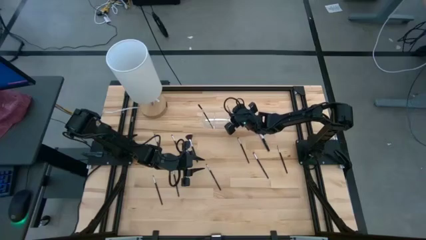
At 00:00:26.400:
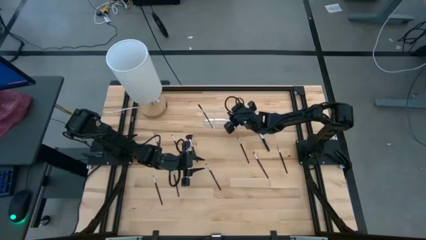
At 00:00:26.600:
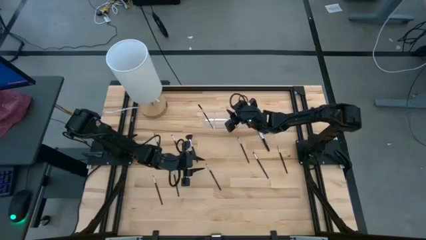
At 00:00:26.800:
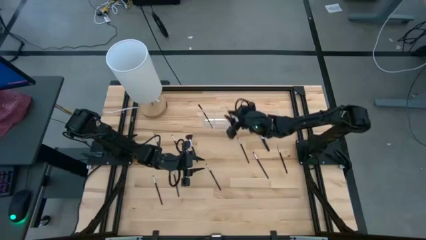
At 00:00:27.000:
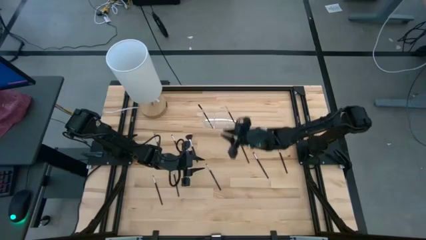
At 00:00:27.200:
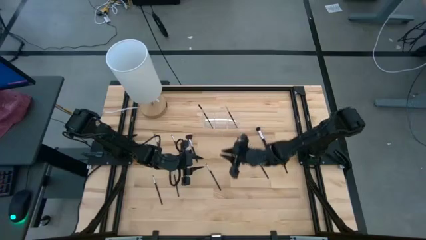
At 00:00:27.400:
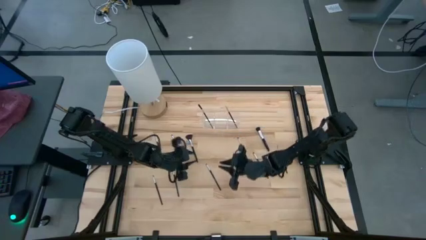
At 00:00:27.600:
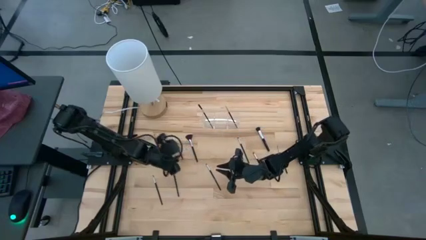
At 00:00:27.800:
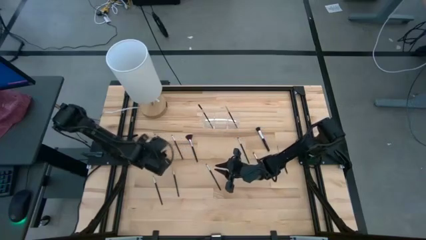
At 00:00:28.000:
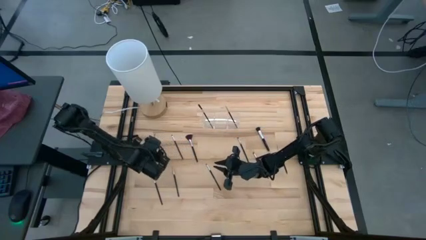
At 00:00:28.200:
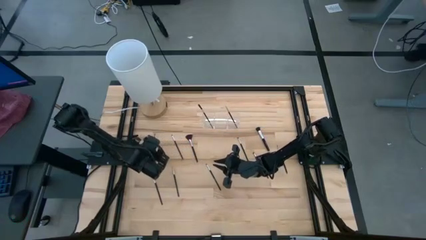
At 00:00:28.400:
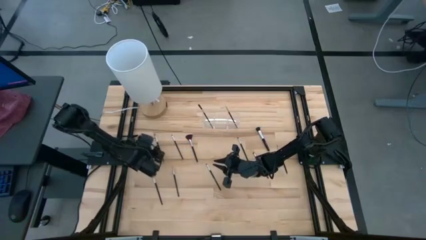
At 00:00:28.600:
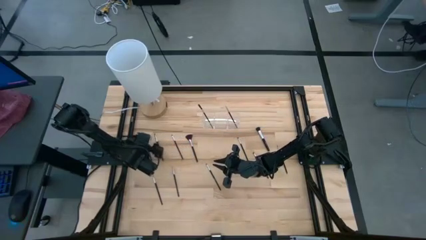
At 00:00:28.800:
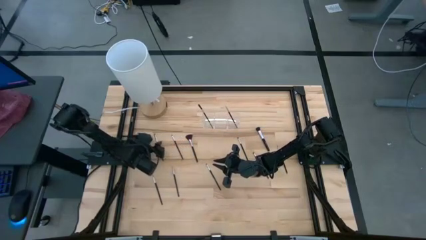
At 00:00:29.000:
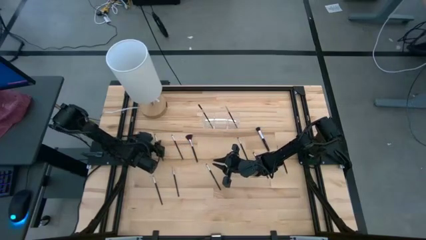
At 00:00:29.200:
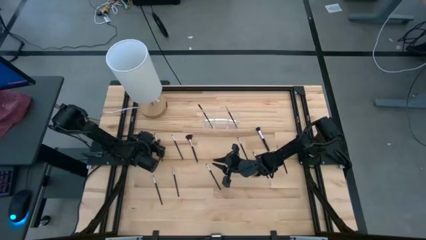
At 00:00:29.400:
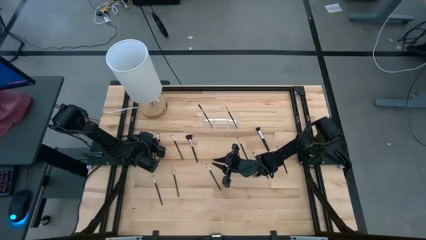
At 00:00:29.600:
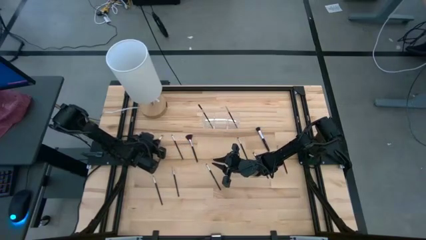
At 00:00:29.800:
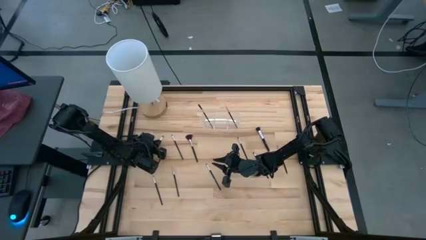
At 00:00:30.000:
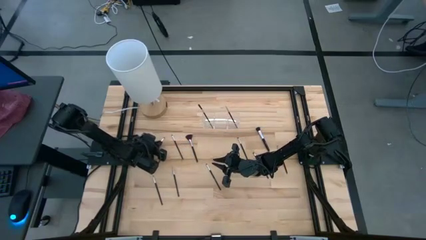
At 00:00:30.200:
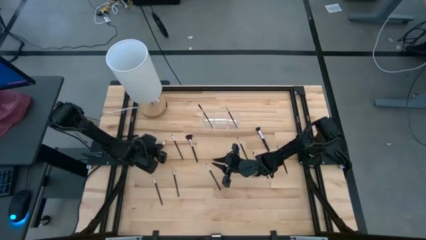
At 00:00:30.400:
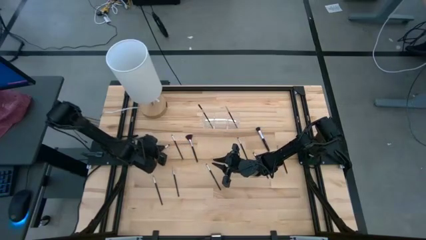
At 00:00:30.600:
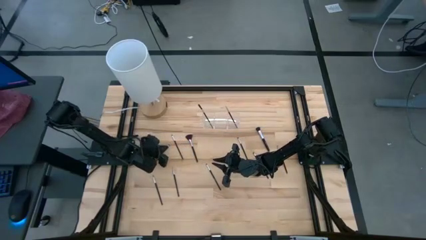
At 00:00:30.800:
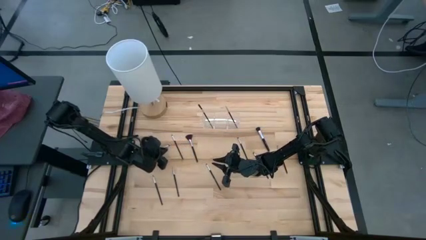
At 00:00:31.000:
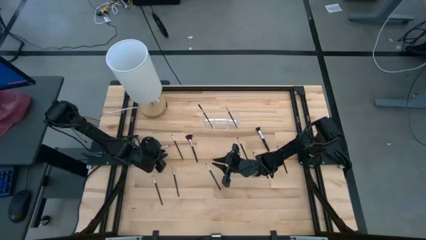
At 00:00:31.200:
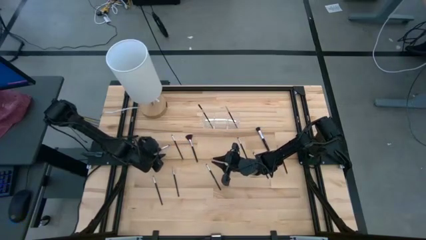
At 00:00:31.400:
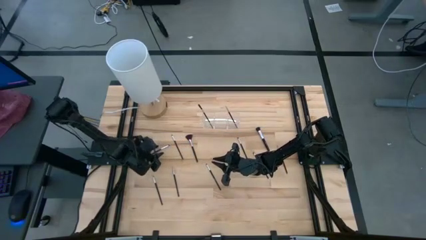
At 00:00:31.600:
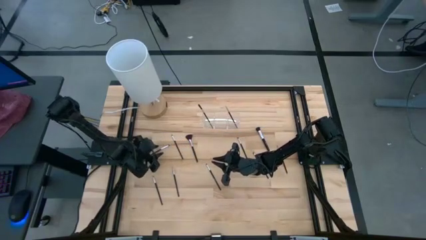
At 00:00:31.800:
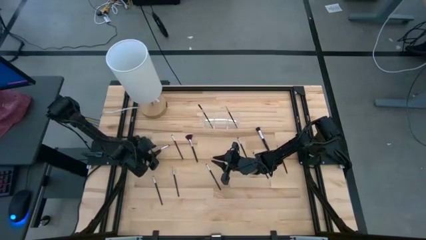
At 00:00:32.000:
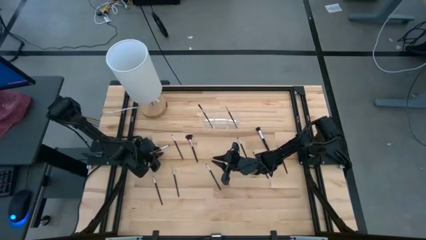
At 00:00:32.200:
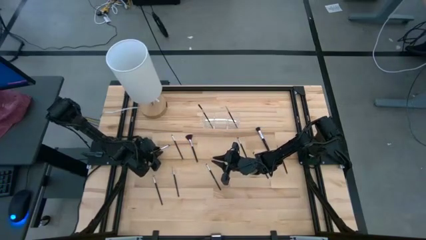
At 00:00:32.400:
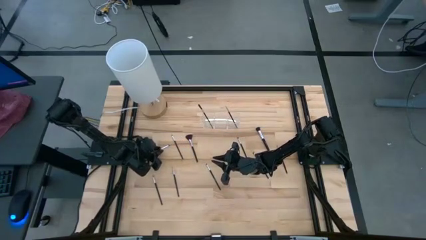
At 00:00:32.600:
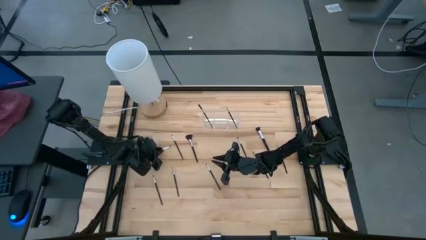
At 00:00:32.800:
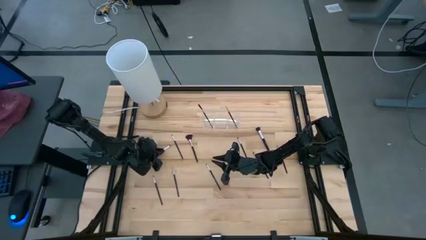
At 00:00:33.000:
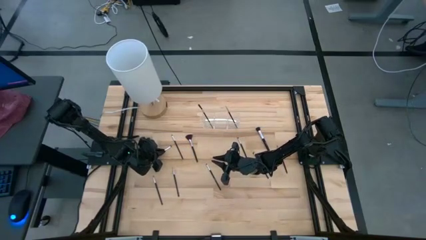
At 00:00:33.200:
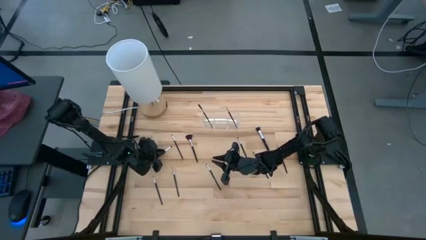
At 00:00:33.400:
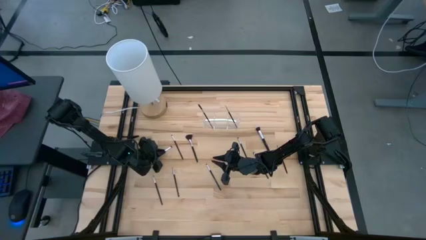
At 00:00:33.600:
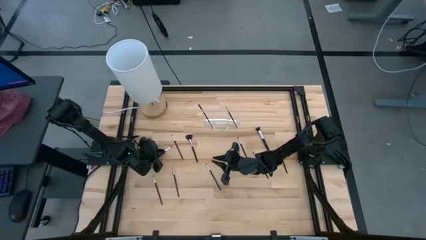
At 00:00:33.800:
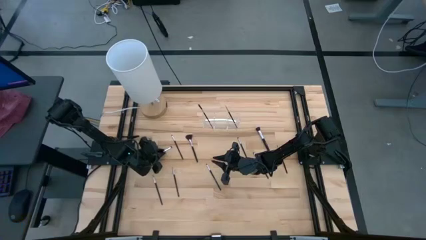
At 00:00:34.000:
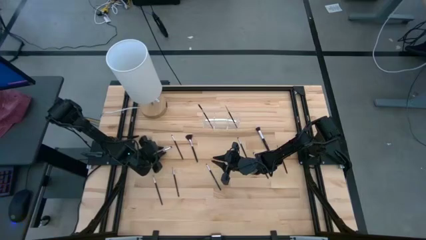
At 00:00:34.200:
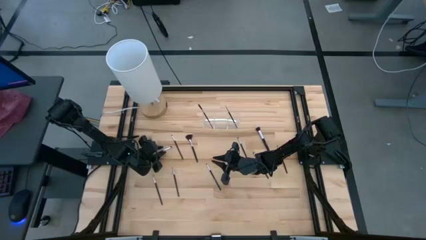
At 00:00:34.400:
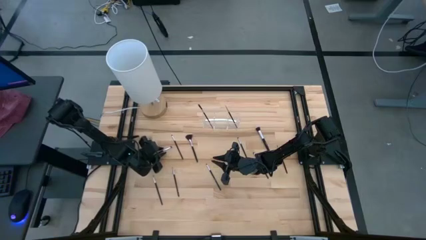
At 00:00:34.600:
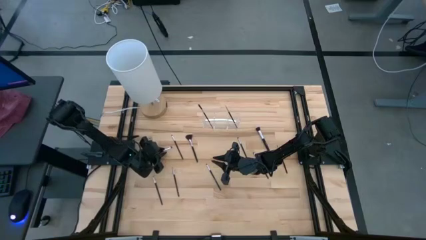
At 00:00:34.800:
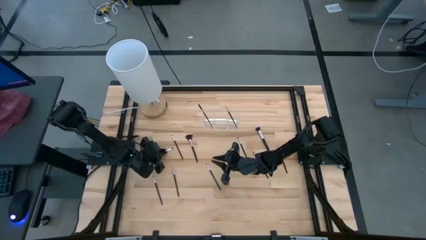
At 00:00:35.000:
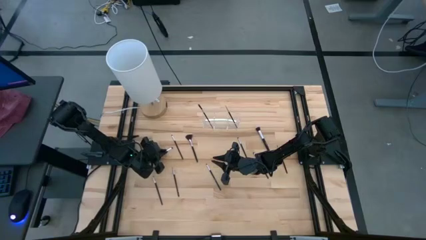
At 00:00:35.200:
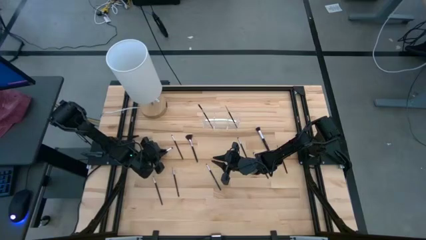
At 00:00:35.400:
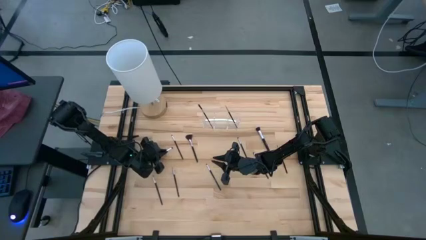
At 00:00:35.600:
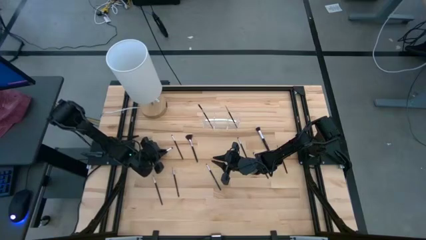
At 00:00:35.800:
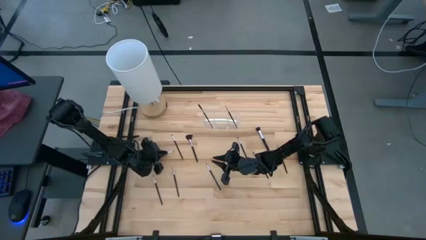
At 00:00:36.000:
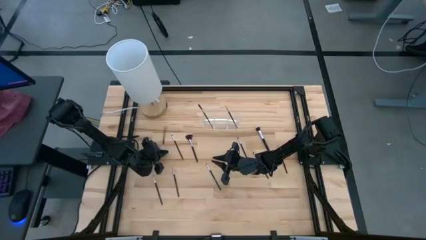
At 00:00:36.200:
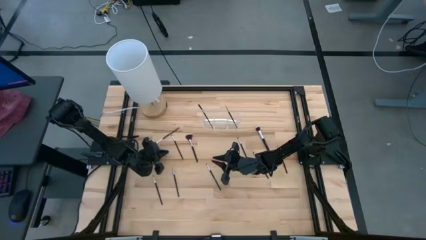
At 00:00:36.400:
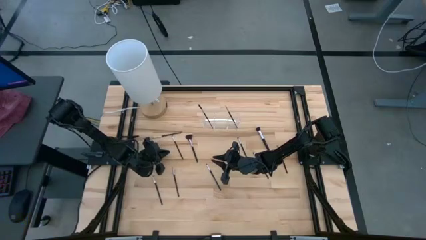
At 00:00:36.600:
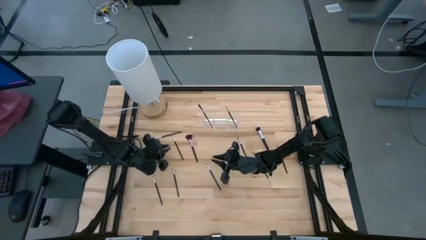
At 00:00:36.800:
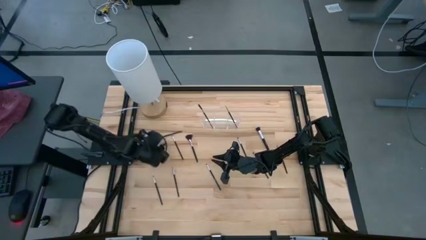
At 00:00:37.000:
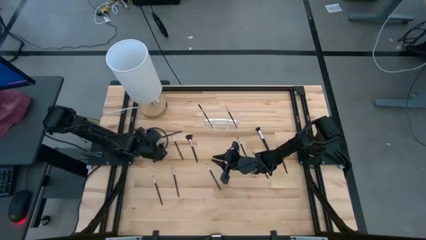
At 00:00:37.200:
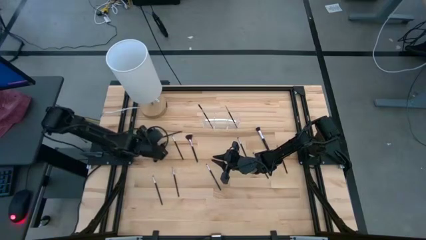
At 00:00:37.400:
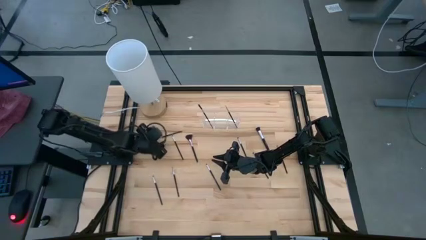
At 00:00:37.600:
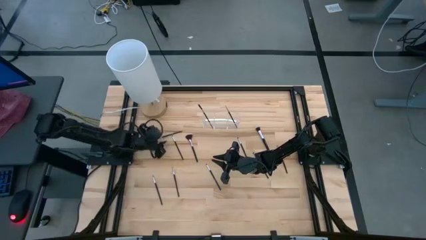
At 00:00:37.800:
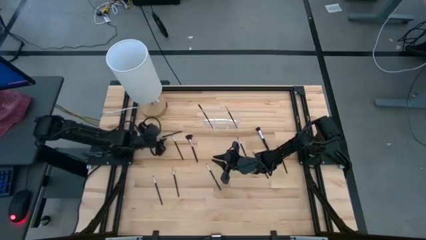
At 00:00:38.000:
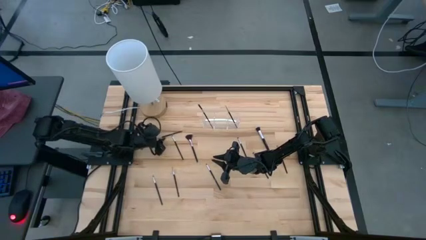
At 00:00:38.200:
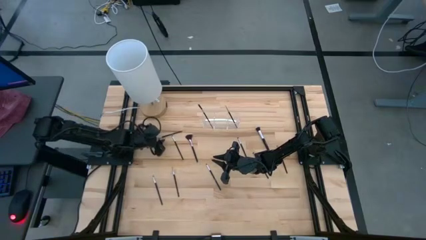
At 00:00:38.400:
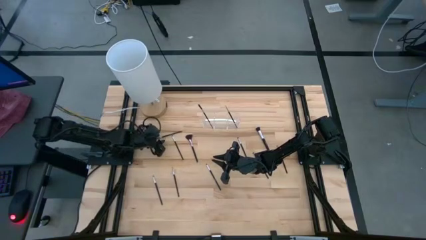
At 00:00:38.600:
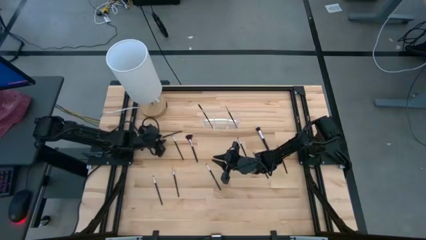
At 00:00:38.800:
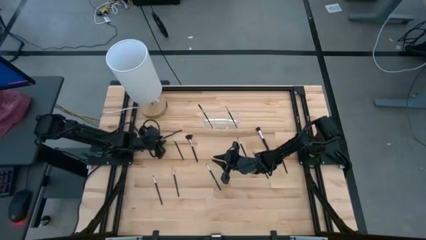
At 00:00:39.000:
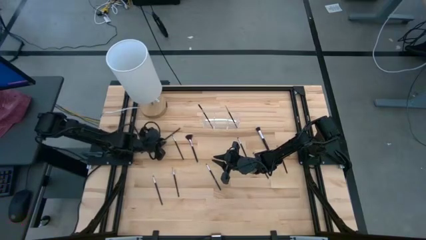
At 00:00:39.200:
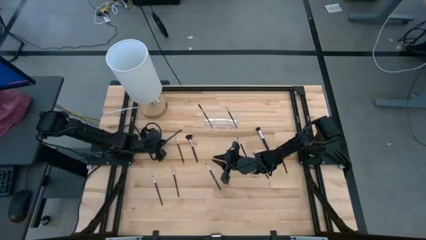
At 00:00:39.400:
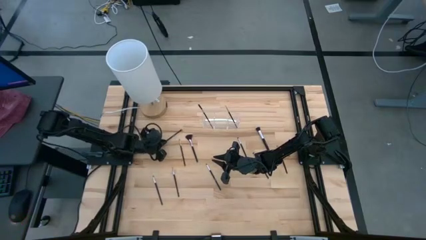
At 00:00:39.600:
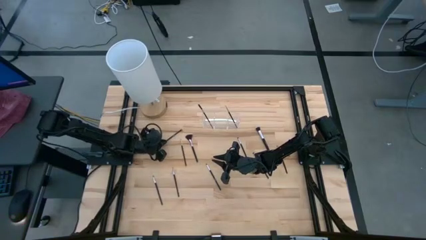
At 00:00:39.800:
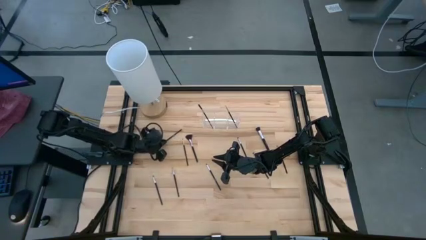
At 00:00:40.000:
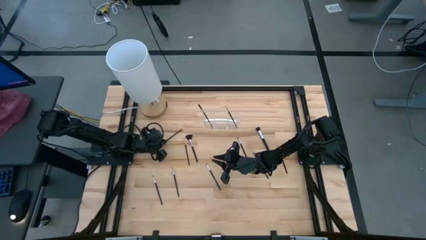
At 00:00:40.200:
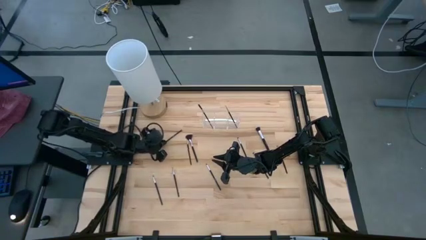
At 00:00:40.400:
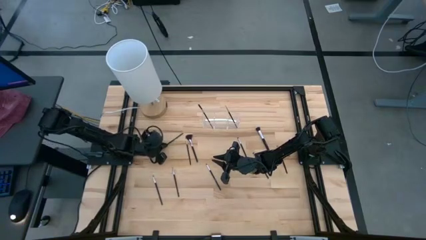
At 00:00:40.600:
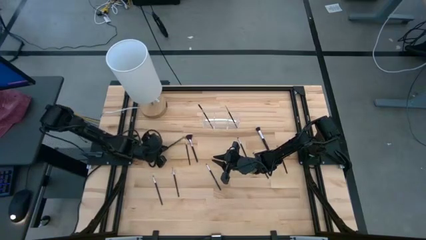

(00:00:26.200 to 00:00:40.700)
Task: Put items in baskets/containers
Put the black eyeshadow brush into the transparent organizer

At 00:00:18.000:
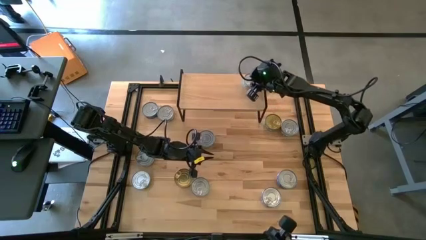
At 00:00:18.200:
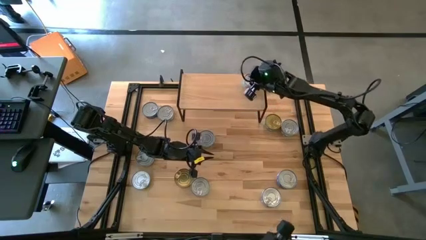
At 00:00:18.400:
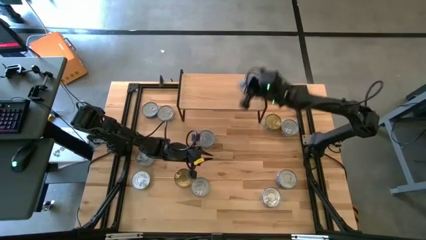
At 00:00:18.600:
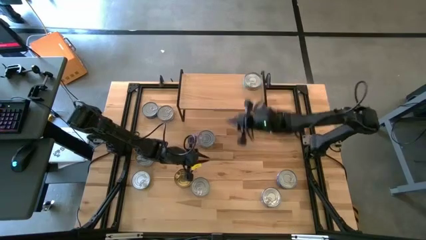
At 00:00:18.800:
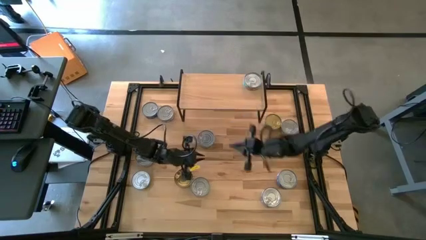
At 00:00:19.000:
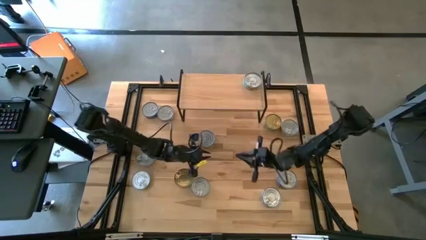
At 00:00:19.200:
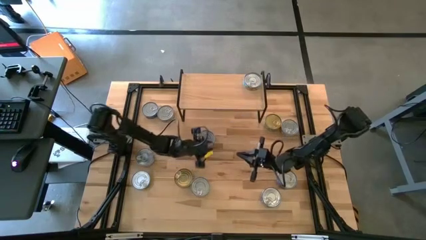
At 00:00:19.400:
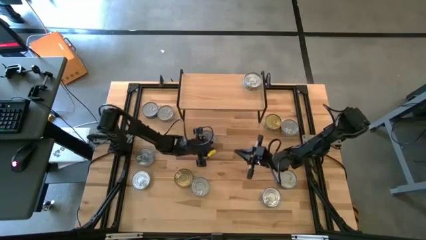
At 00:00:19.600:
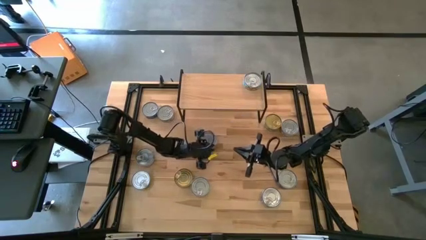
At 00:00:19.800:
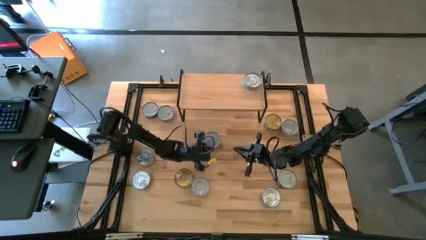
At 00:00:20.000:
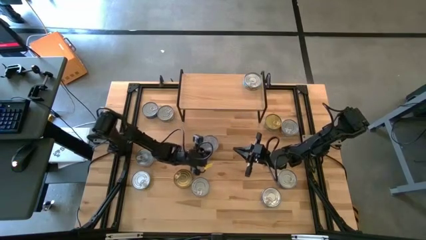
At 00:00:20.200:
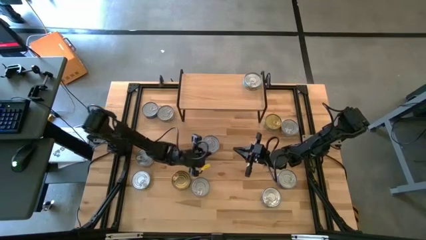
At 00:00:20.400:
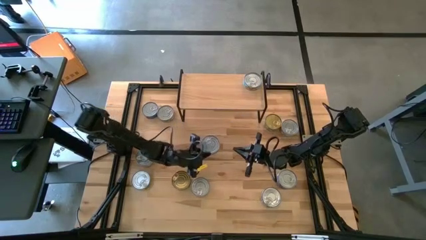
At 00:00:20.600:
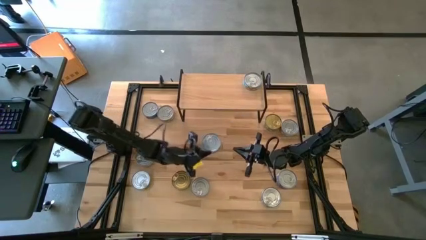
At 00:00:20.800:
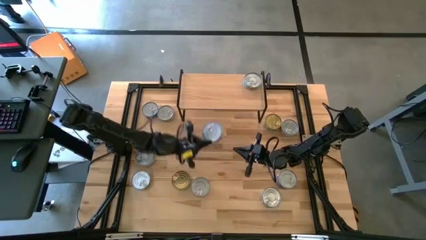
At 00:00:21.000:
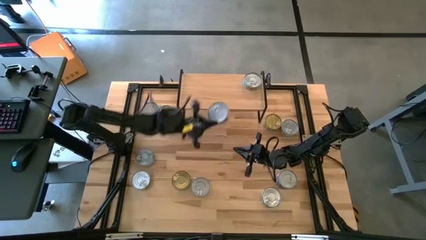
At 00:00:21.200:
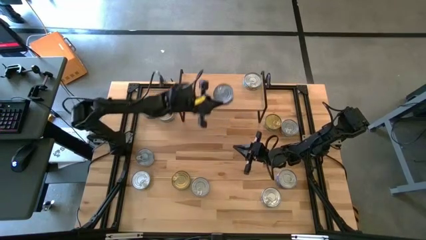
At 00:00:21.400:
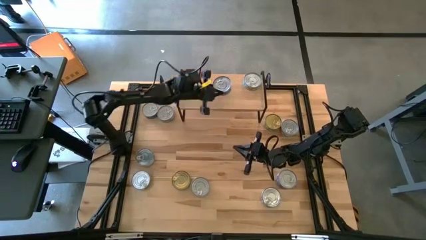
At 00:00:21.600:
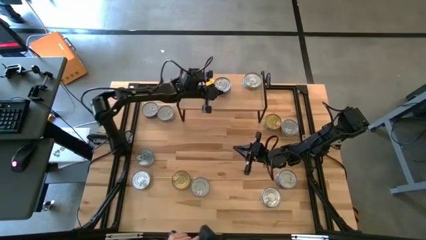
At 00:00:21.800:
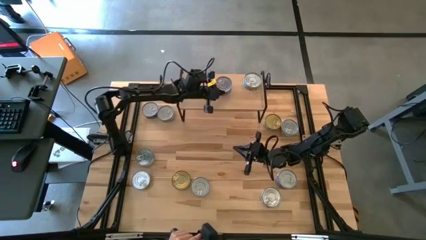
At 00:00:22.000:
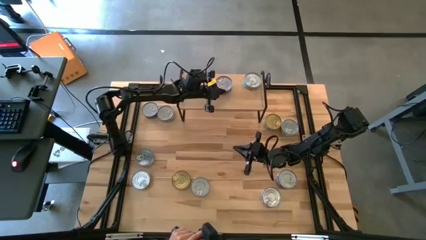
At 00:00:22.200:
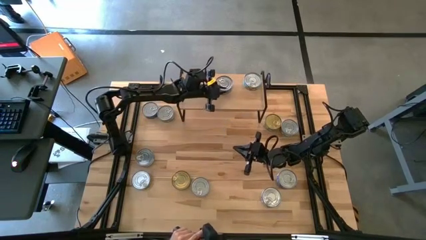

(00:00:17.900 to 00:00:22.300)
Task: Stack canned seafood by type on shelf
Put the green tuna can on the shelf
